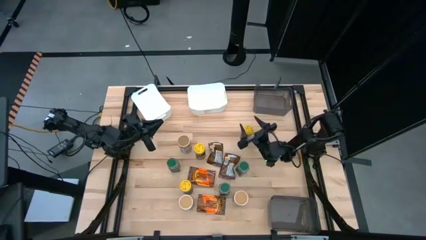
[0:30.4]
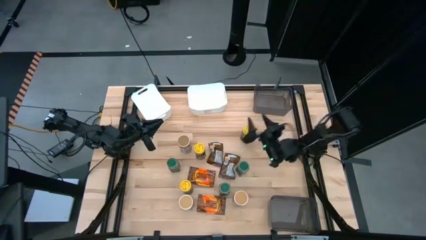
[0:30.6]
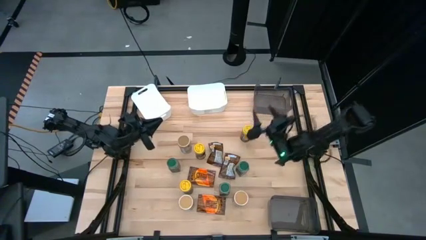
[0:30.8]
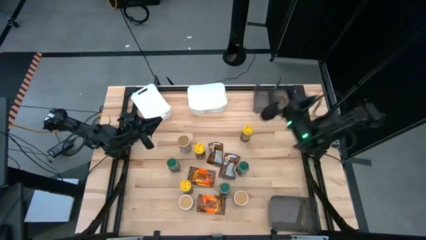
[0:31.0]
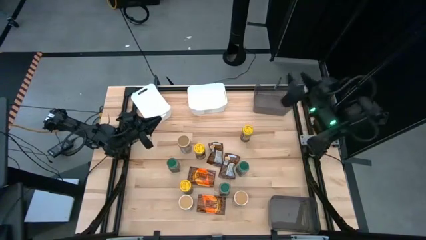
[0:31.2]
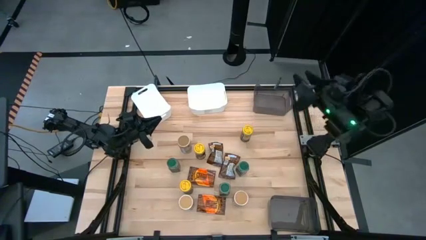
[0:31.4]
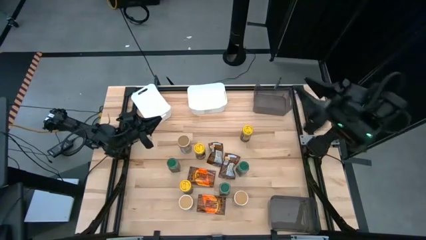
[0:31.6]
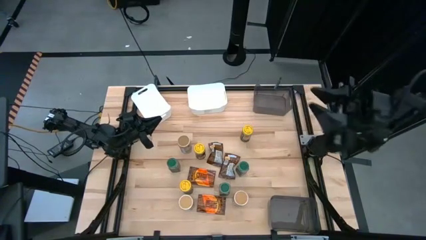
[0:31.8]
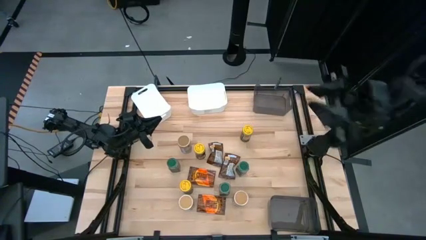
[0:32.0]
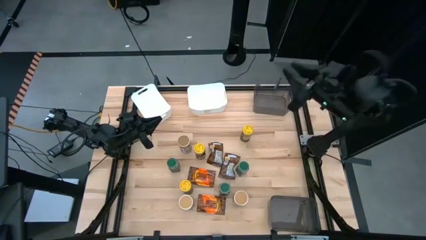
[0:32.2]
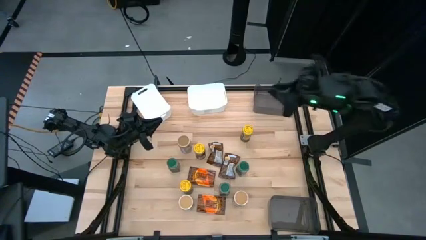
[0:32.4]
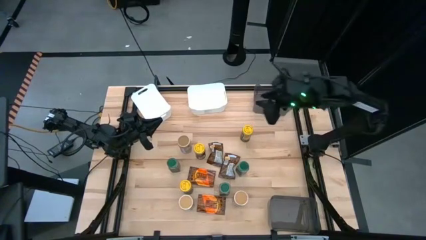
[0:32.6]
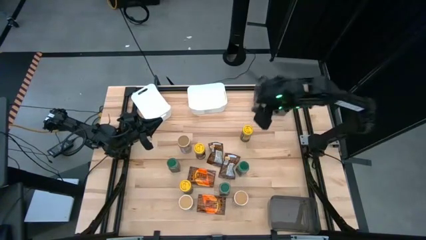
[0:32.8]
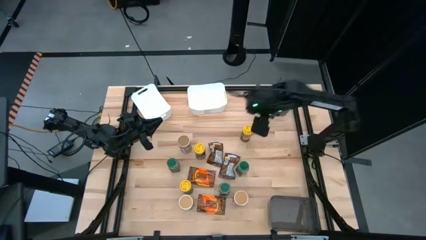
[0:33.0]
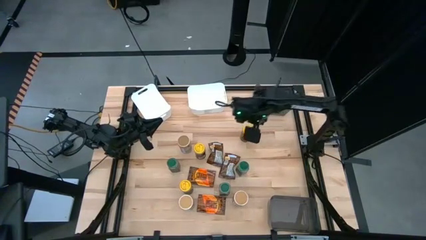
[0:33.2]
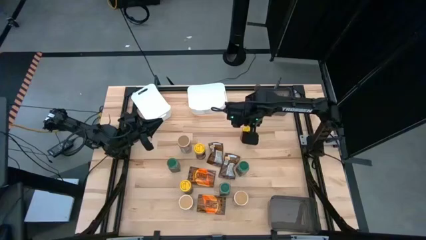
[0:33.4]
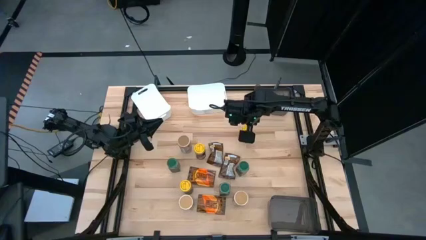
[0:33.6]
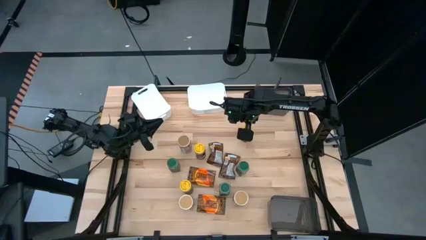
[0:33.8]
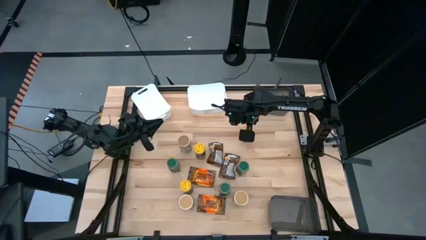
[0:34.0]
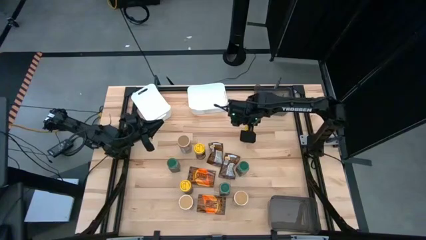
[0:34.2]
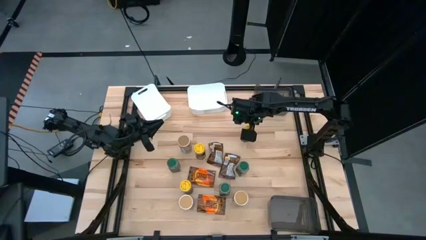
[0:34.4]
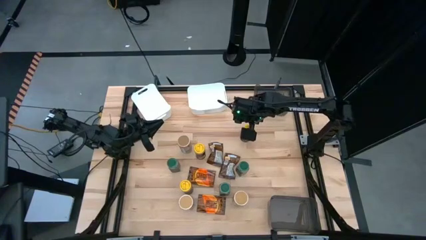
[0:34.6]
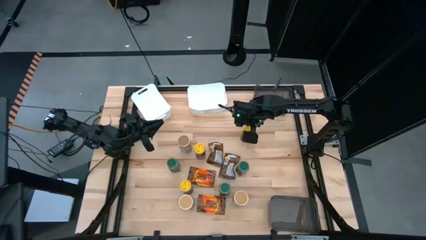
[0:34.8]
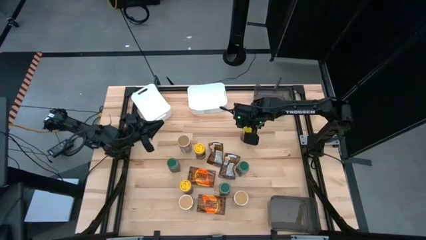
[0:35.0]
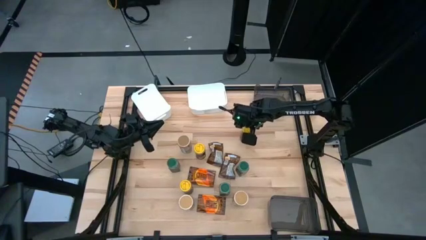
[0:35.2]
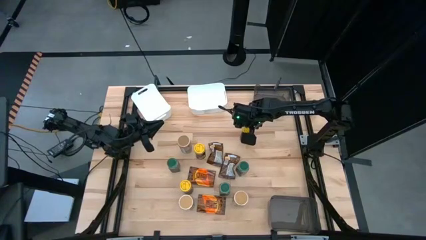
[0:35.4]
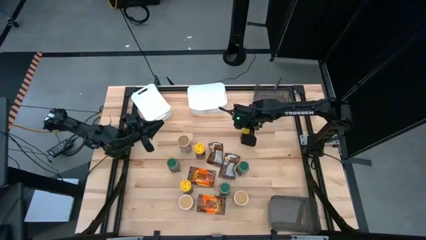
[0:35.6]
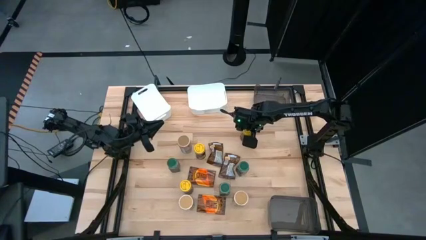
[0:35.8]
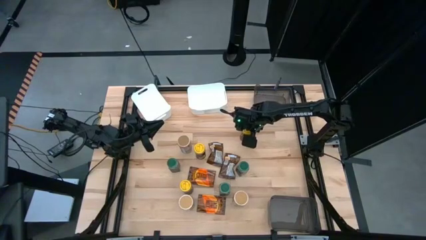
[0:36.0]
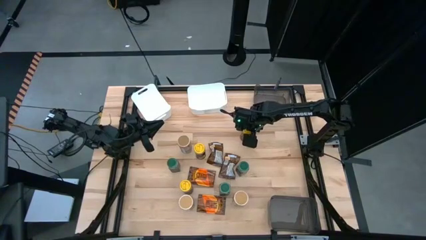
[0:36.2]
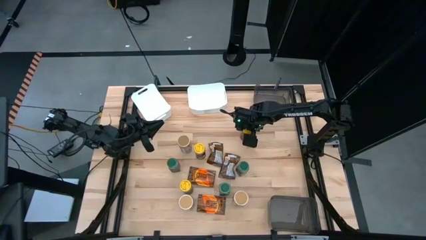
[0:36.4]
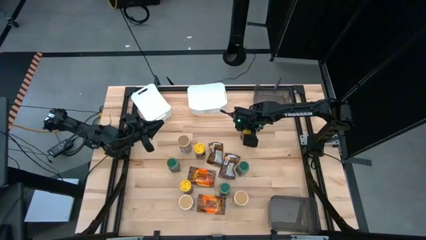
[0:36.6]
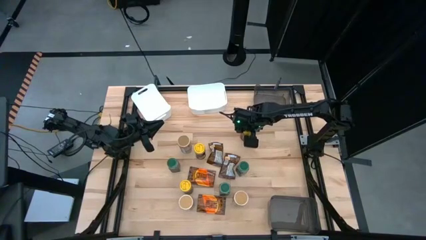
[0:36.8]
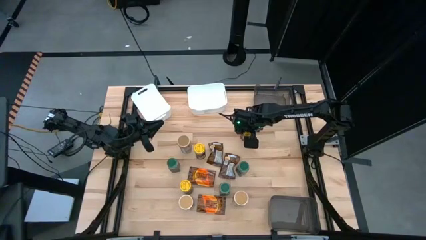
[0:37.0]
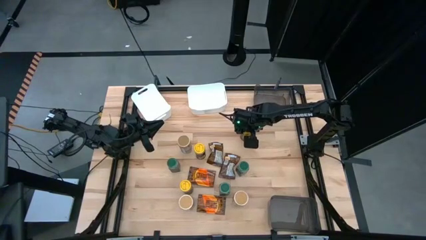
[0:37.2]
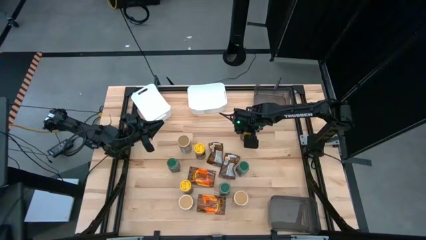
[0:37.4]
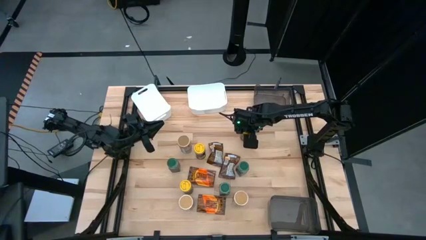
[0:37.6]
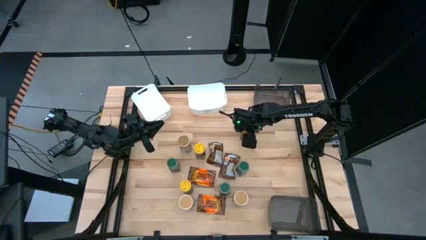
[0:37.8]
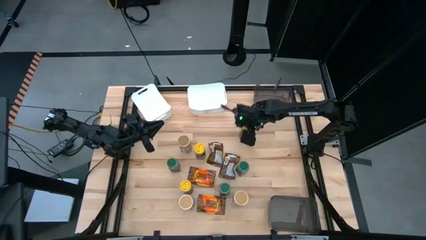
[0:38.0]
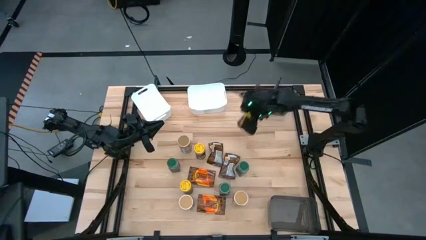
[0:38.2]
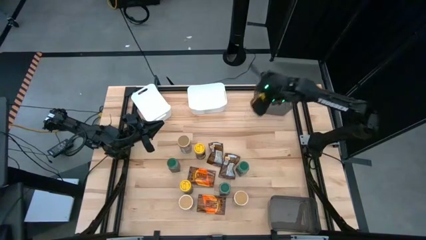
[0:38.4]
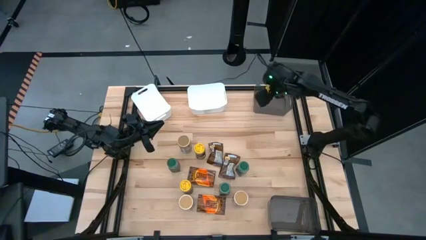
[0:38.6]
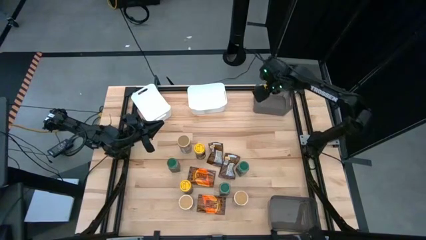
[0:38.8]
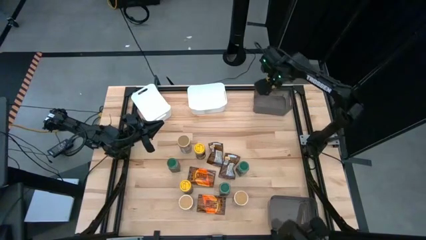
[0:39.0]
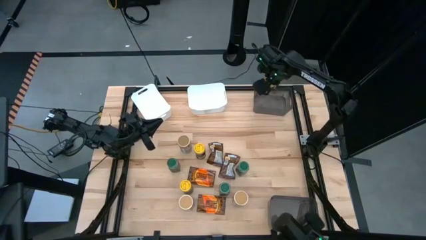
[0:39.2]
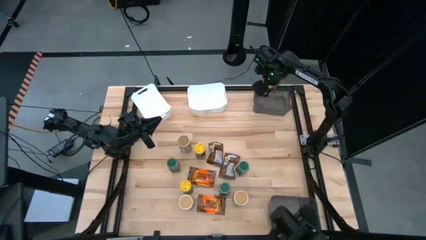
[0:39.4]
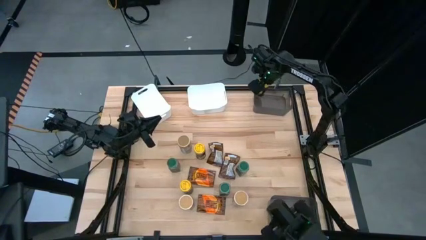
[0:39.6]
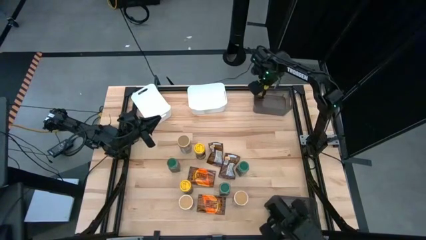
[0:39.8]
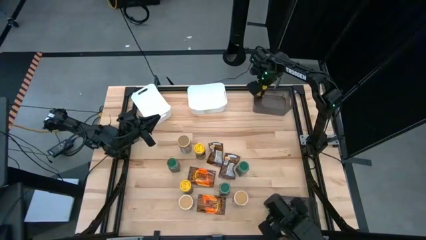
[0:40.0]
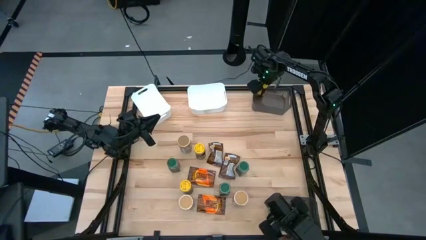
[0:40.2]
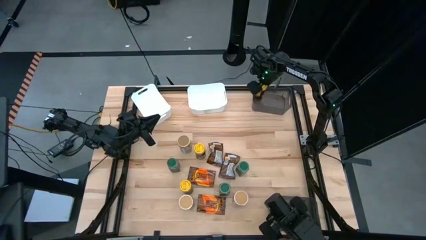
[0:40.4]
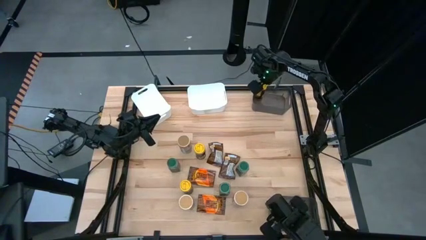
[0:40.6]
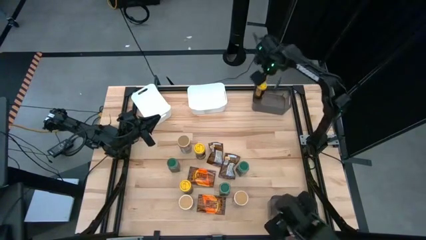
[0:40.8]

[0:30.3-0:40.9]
Task: Sort spices by type
Put the right yellow seasoning bottle into the top black bin

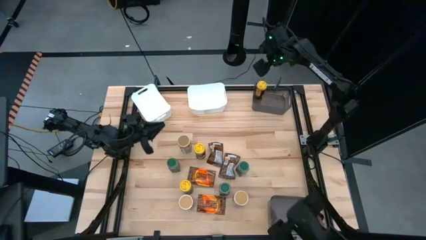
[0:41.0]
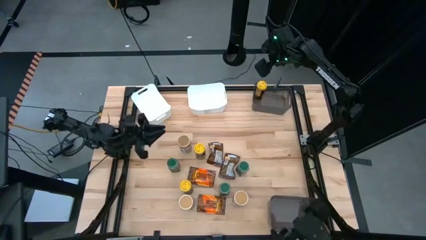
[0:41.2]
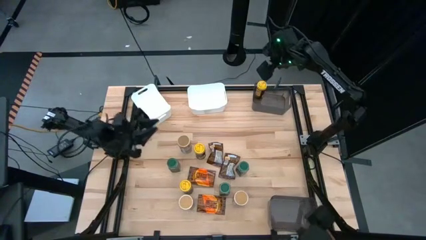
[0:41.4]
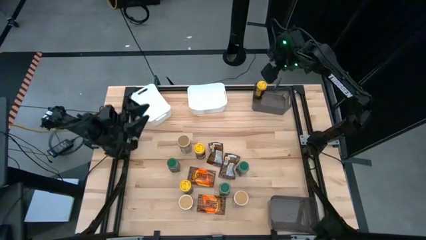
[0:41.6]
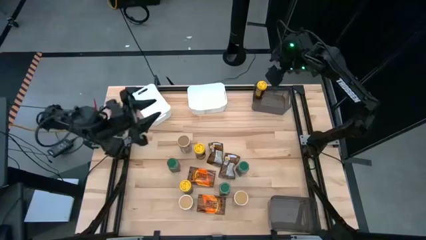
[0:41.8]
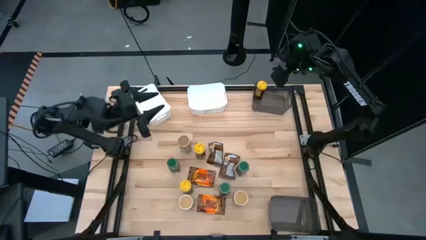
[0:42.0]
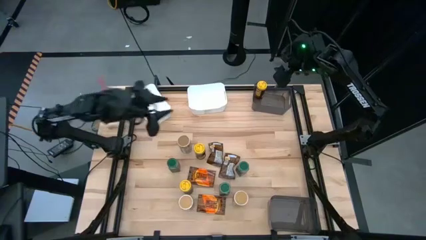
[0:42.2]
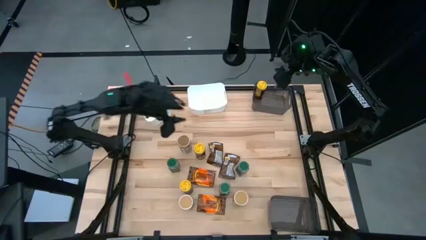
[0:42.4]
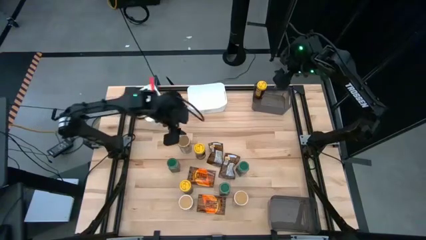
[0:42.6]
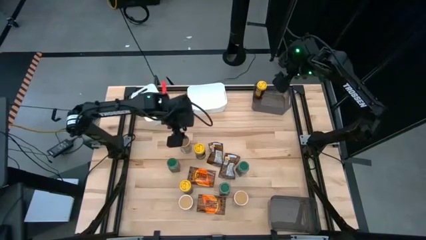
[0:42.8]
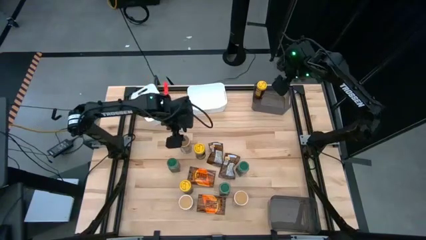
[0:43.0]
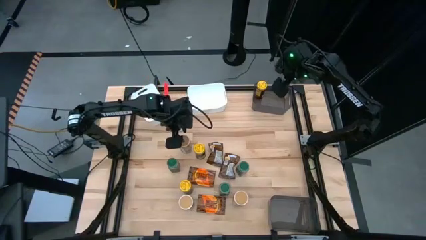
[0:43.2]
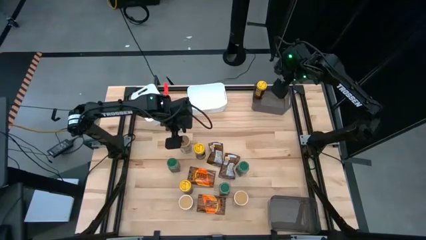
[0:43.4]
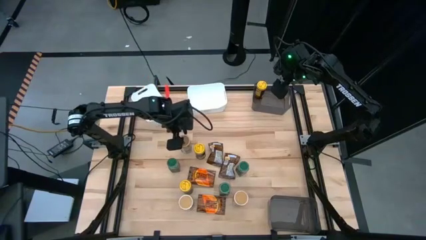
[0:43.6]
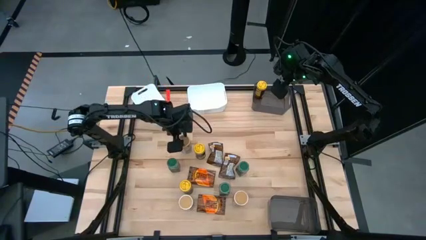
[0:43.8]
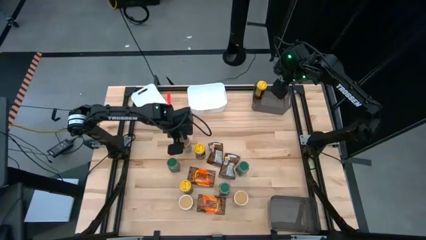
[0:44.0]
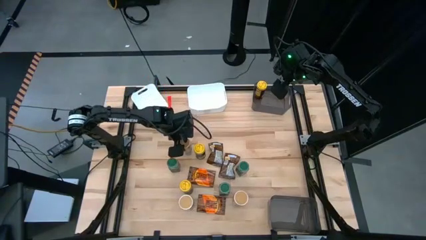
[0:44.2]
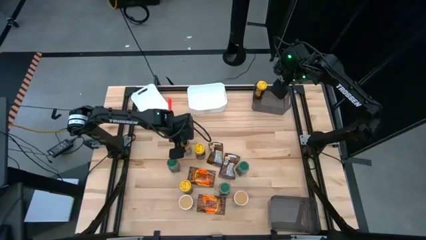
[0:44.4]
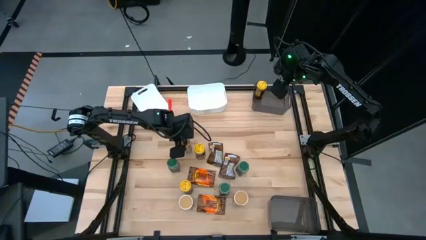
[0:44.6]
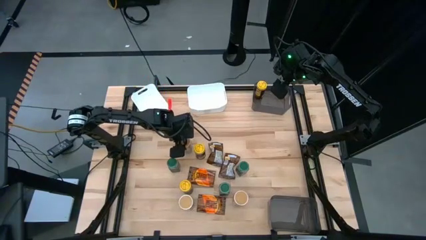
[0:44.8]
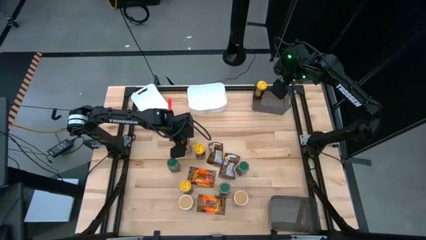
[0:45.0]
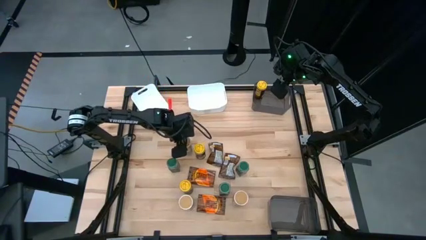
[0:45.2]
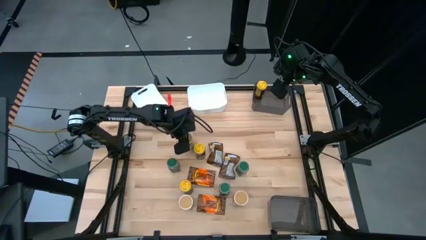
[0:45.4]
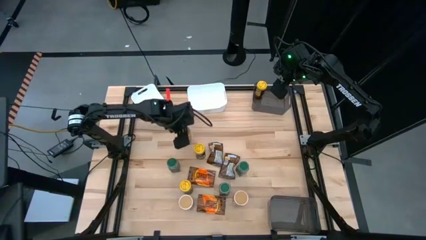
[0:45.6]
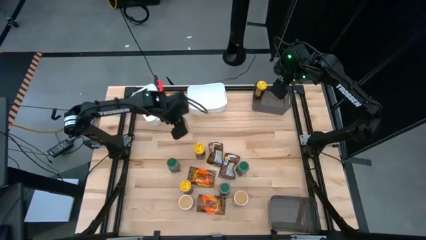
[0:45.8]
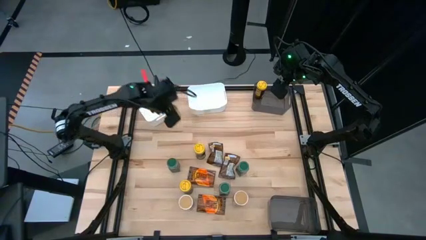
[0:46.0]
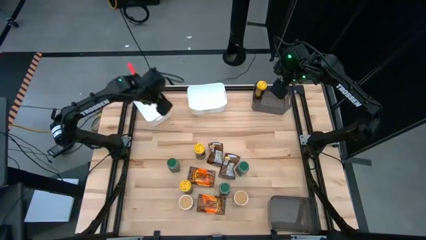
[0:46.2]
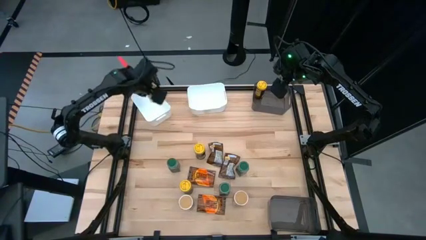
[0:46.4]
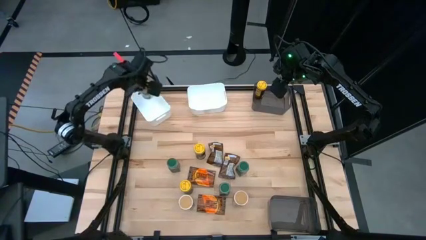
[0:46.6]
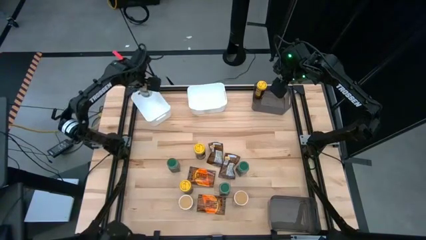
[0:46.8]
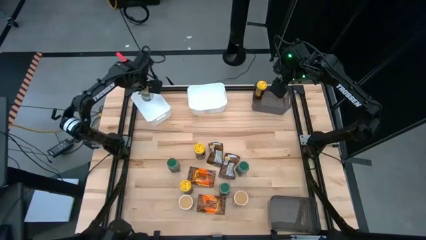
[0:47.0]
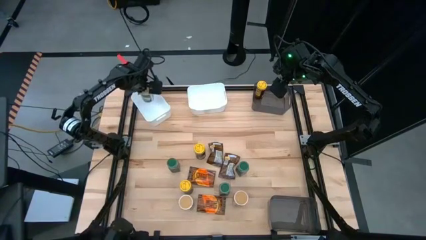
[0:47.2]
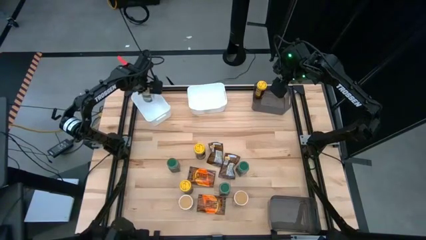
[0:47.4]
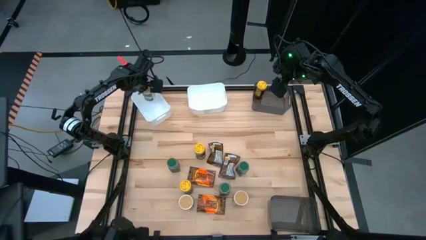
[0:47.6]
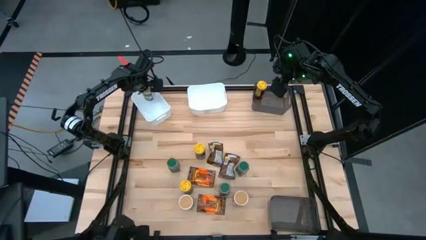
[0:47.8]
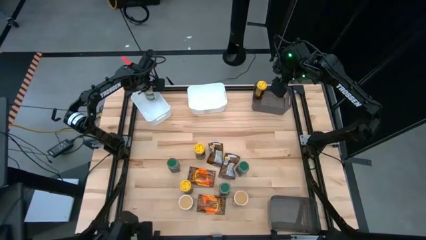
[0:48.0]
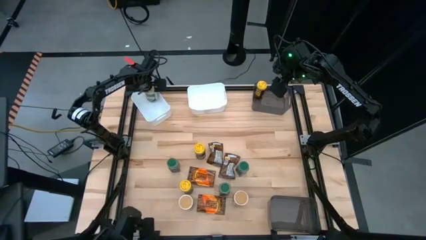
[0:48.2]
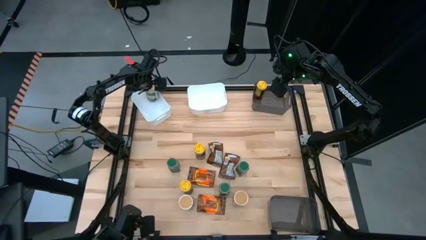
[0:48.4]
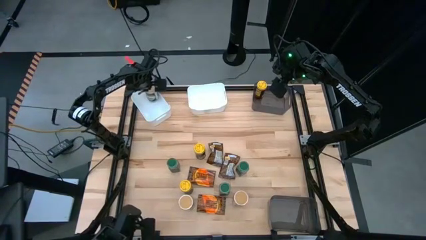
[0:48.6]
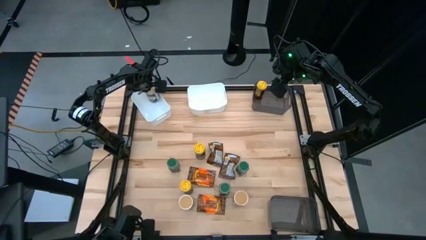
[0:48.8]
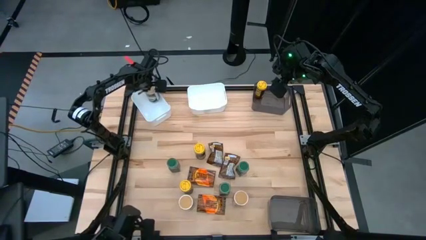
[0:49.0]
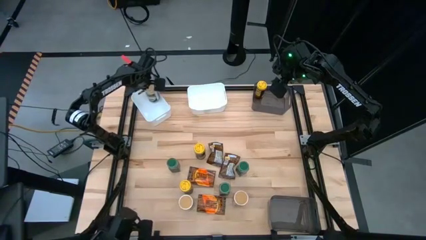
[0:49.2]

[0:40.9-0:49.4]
Put the top gold seasoning bottle into the left white bin
